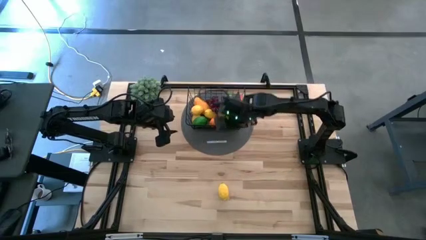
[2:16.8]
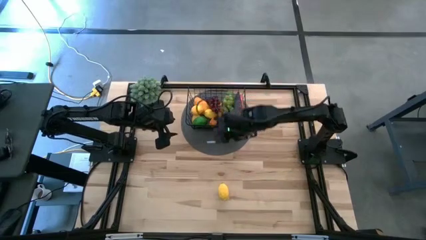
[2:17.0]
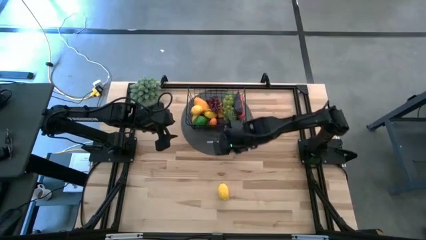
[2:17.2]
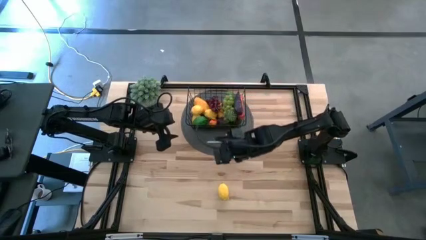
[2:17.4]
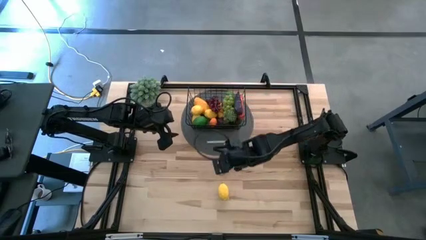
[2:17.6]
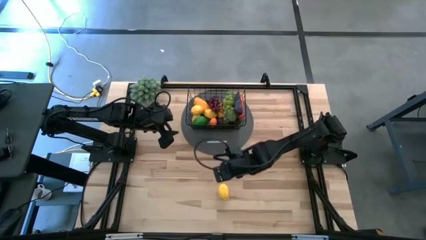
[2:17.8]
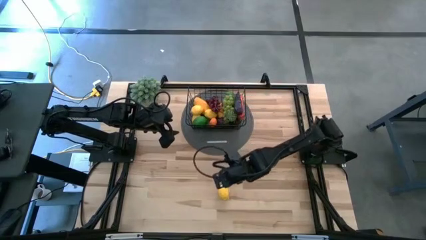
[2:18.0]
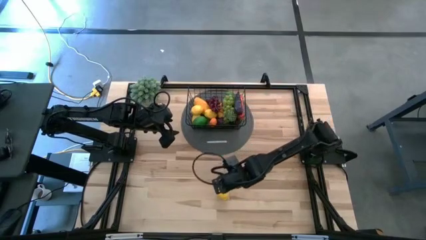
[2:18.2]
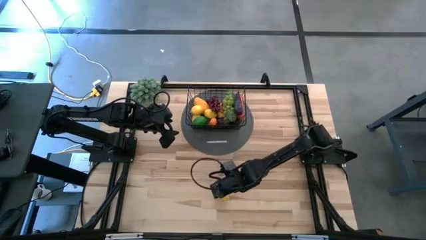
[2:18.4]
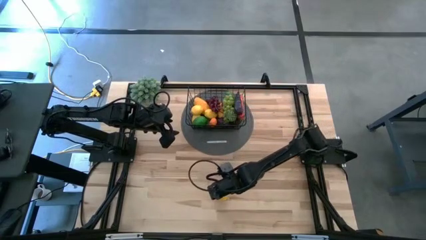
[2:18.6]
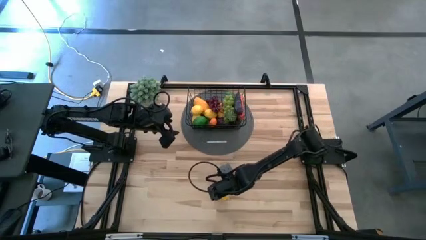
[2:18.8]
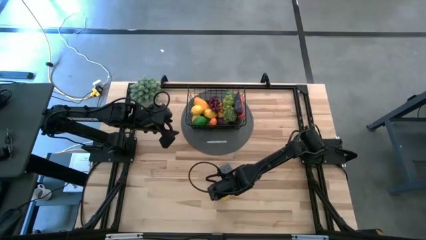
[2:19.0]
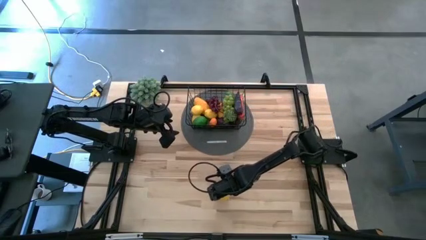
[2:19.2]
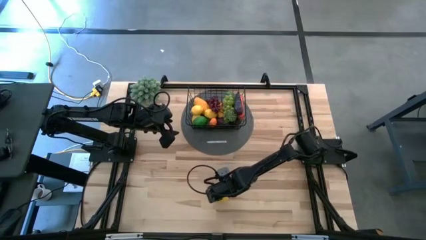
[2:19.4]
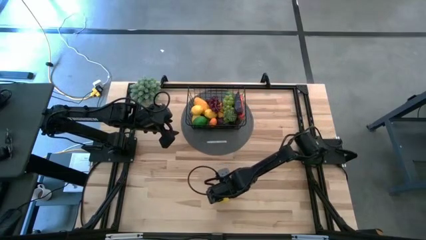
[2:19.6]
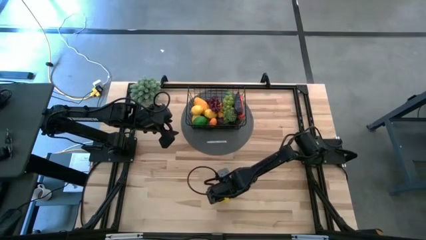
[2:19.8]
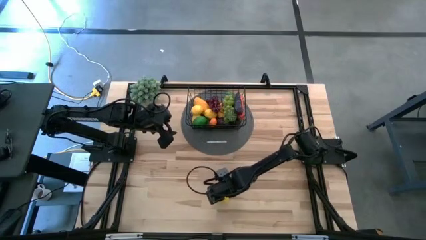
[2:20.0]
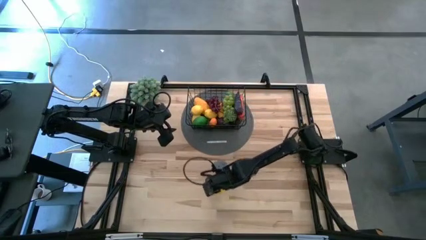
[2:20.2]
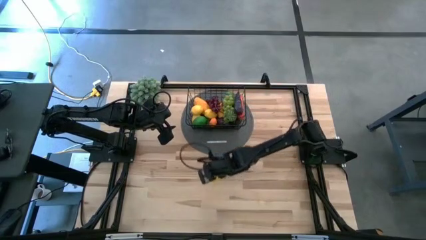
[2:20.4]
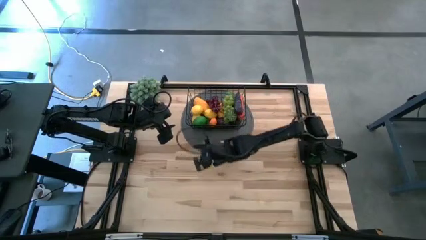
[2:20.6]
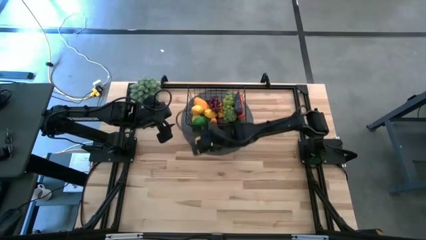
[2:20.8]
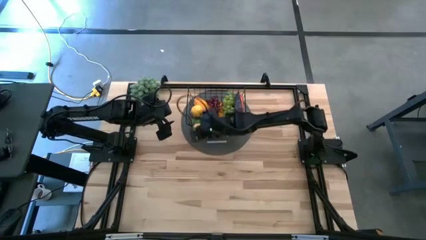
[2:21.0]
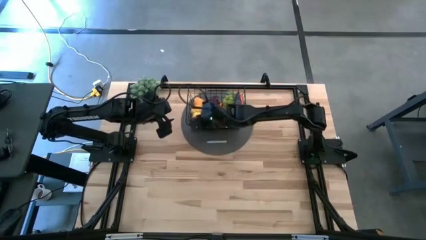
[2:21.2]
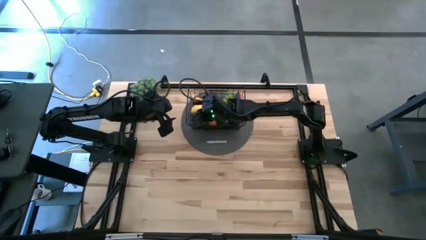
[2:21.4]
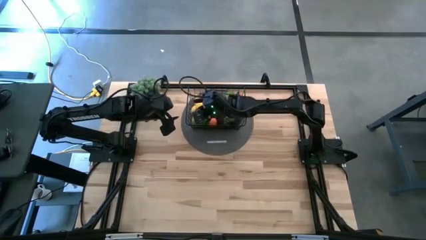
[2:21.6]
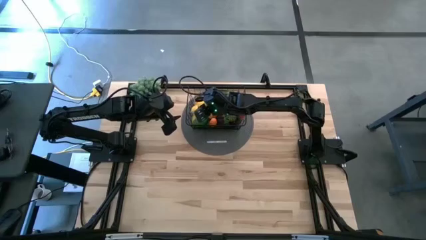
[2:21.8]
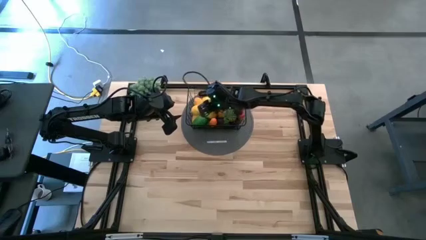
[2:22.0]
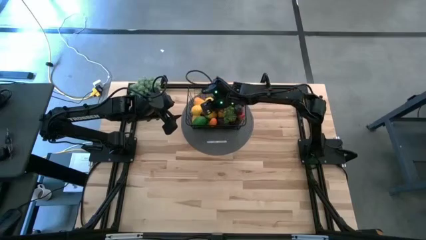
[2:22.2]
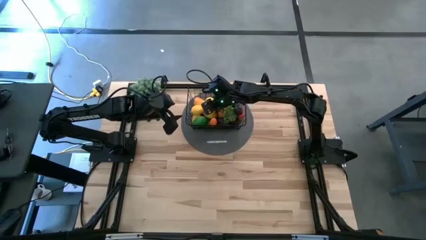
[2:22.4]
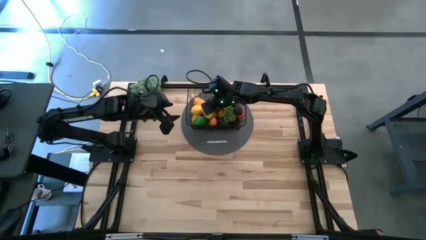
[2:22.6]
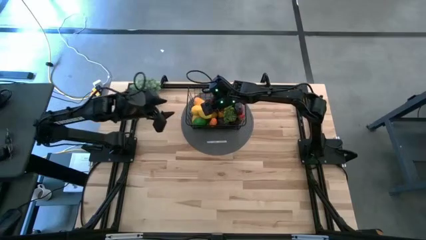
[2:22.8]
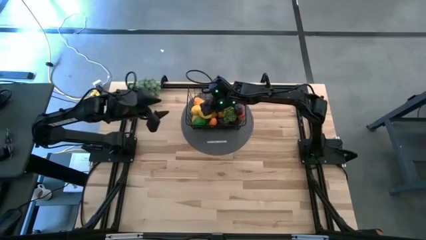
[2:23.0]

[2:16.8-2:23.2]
Task: Build produce basket
Put the right yellow lemon into the black wire basket

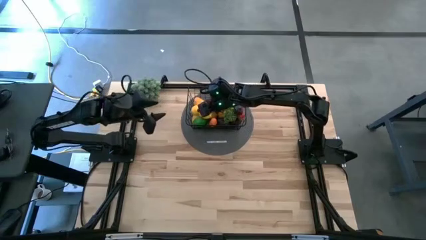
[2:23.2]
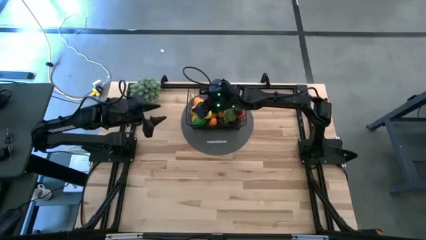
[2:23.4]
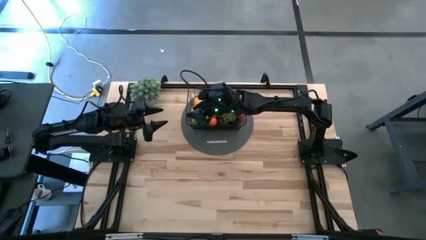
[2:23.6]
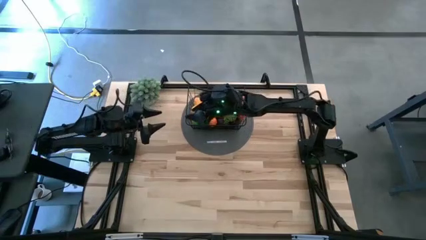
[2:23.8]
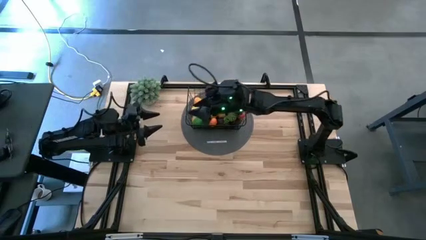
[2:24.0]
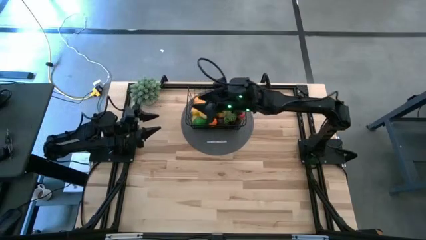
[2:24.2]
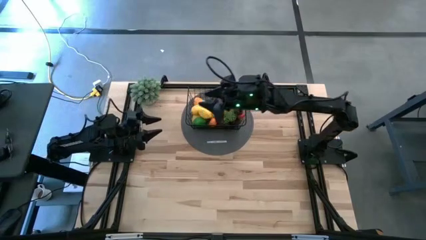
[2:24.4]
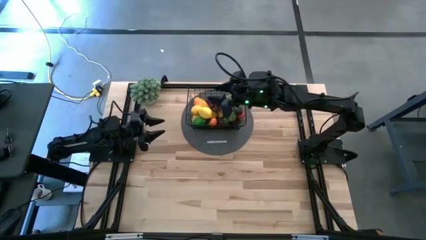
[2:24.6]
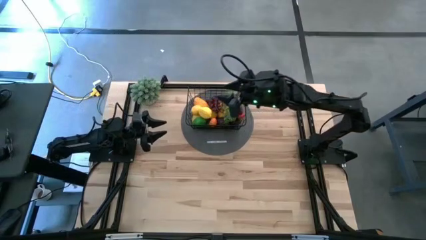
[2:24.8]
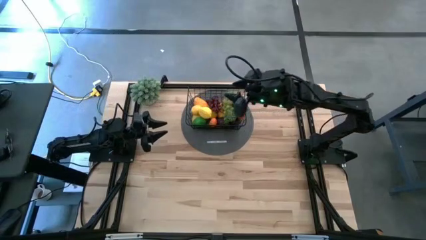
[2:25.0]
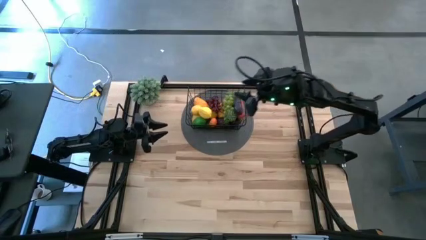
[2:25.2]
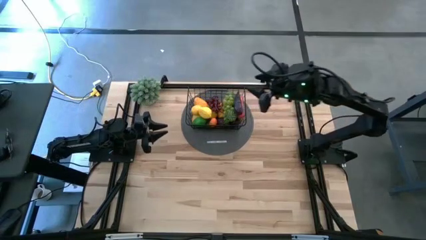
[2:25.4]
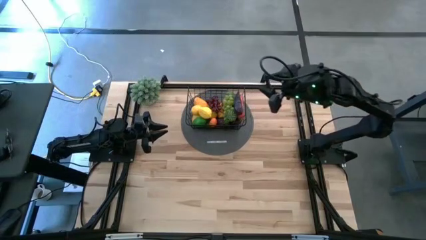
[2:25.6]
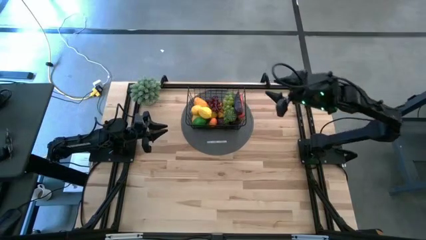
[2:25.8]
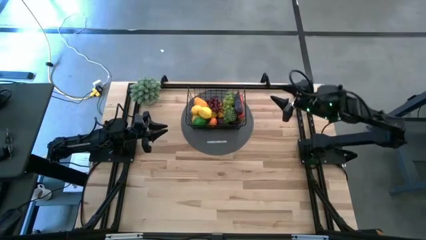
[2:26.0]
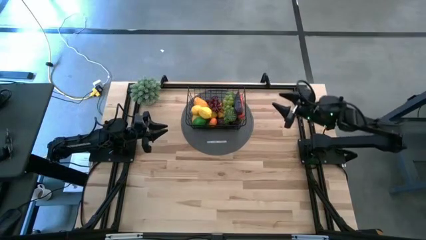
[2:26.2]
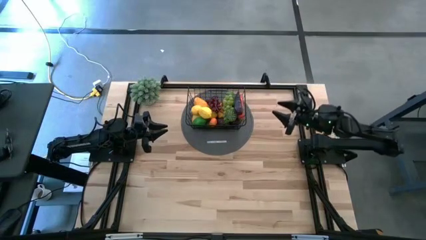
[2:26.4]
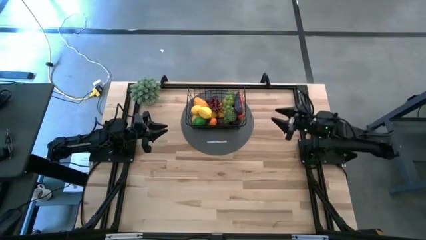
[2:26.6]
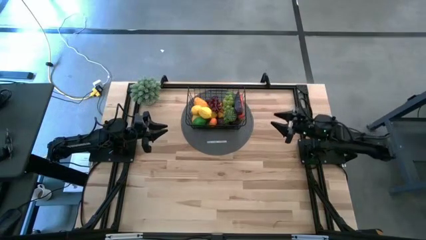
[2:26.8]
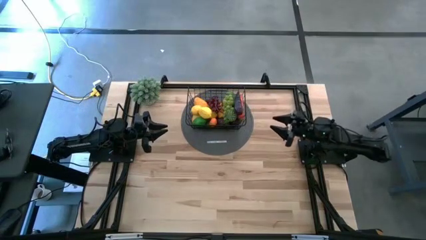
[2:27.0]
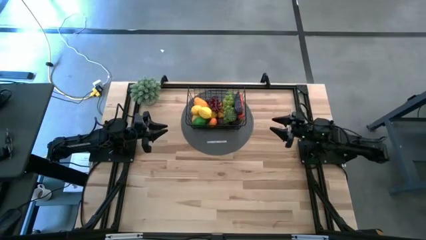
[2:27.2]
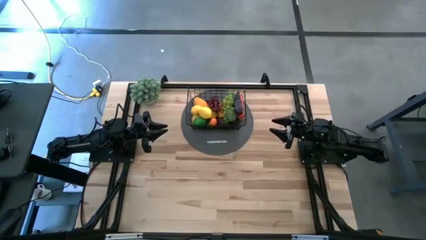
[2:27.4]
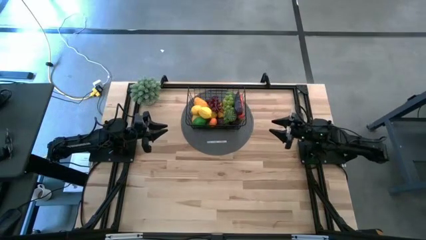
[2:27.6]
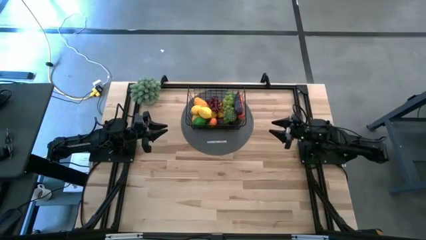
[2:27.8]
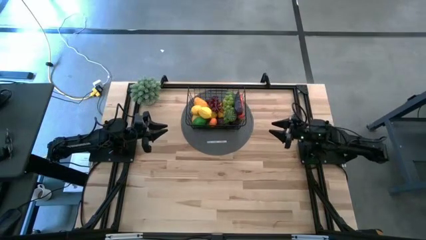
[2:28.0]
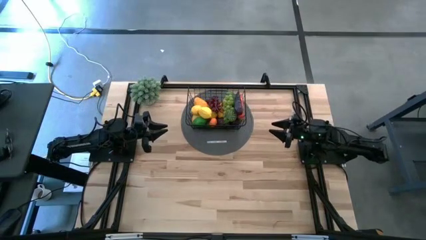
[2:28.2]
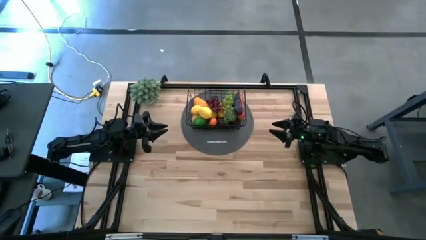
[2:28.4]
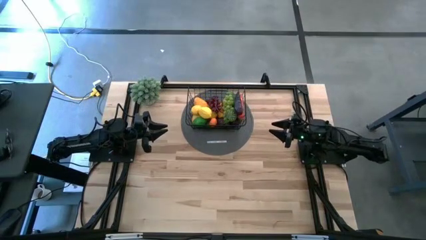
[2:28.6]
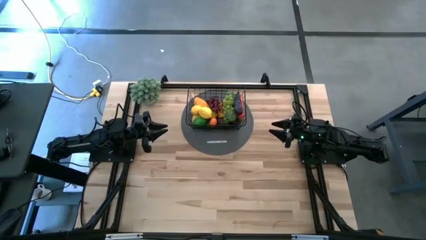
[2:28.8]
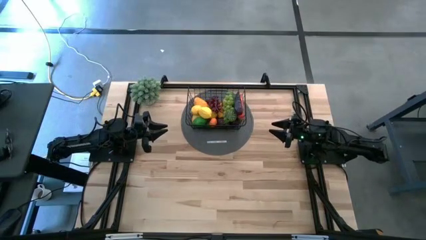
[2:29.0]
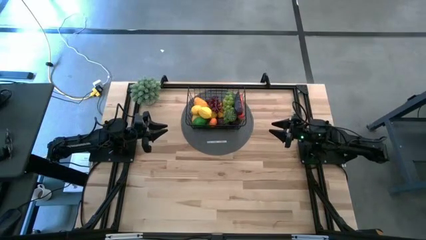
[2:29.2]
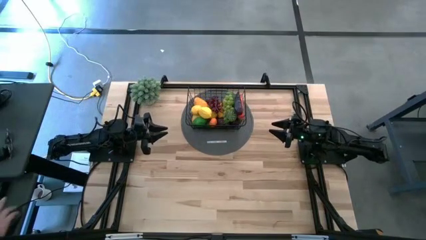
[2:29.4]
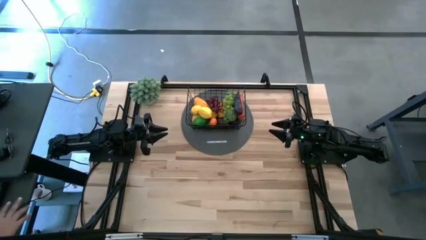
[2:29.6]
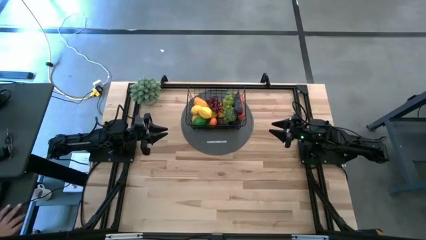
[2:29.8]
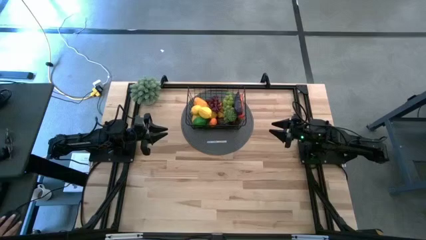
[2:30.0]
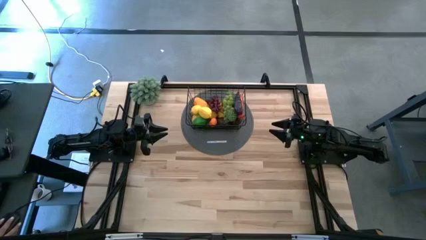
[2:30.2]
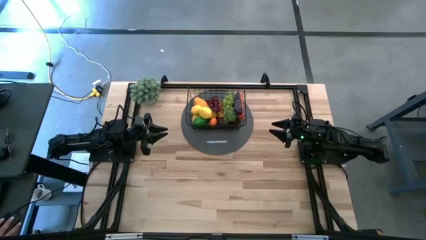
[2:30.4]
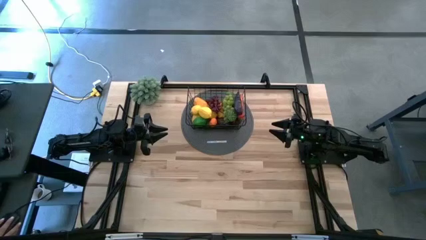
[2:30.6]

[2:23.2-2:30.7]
Return to Home Position

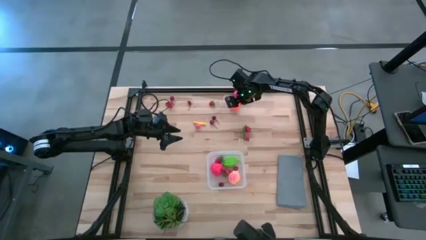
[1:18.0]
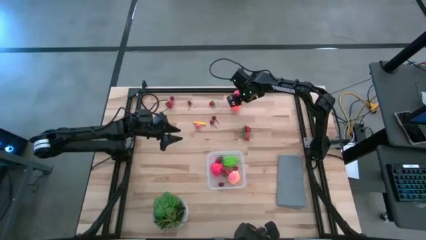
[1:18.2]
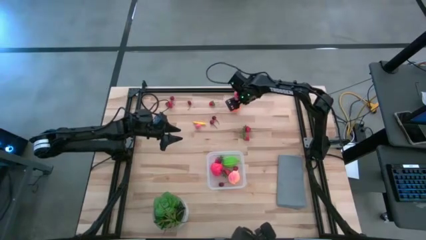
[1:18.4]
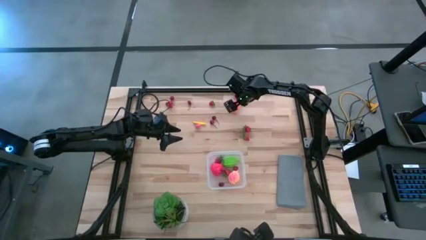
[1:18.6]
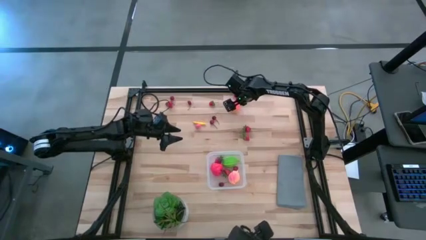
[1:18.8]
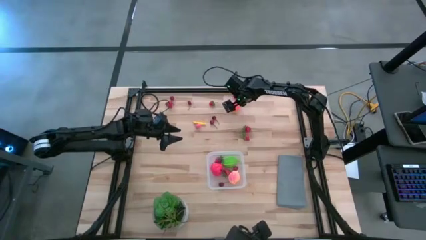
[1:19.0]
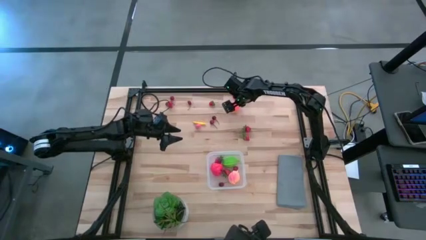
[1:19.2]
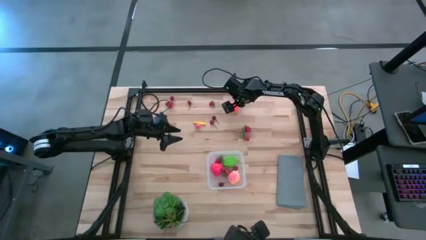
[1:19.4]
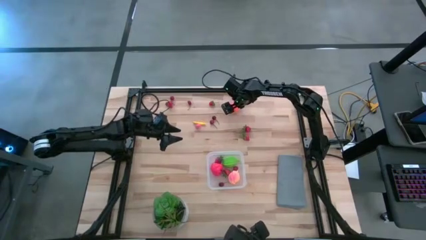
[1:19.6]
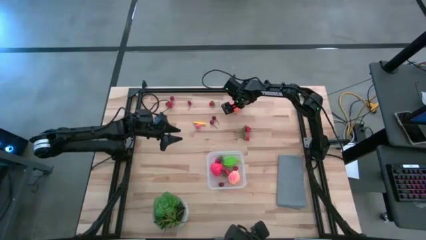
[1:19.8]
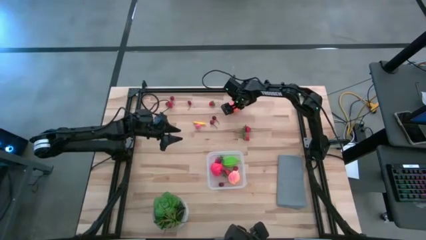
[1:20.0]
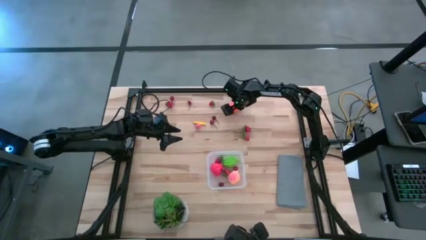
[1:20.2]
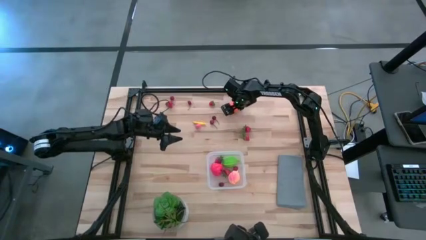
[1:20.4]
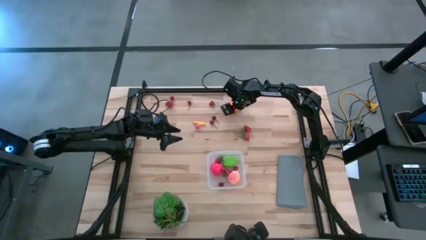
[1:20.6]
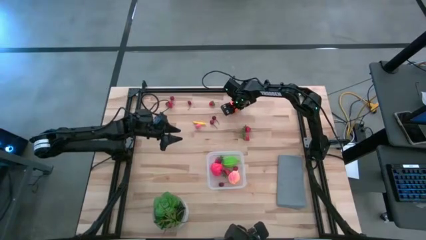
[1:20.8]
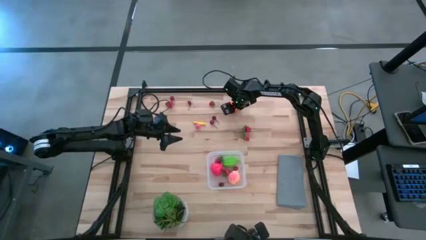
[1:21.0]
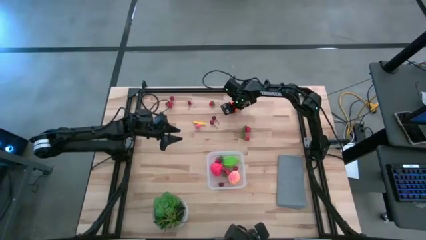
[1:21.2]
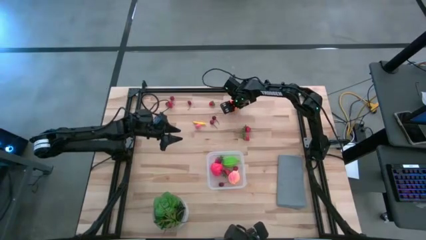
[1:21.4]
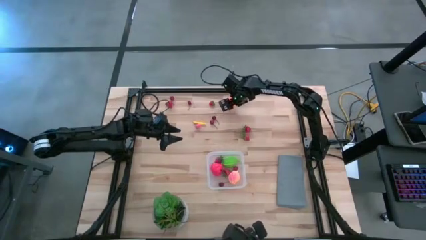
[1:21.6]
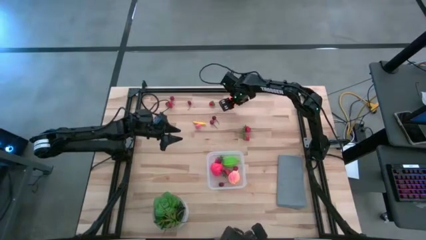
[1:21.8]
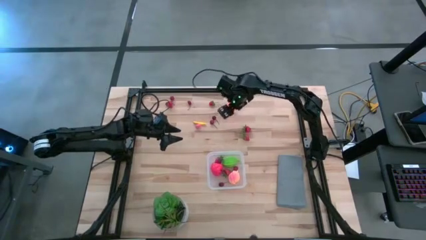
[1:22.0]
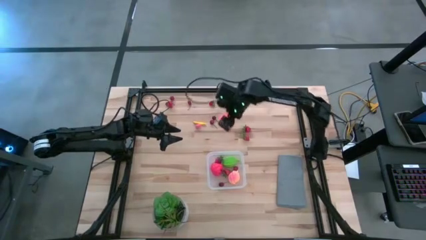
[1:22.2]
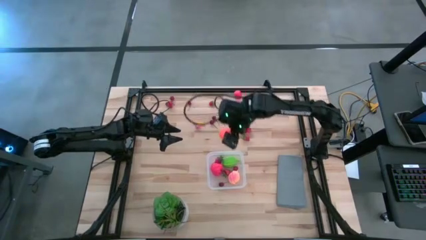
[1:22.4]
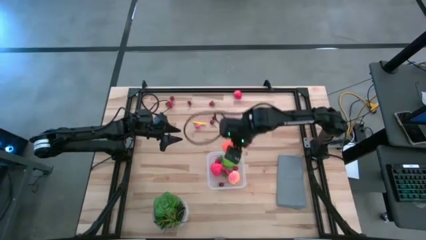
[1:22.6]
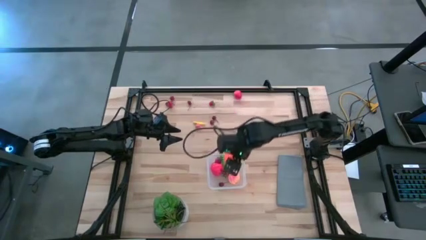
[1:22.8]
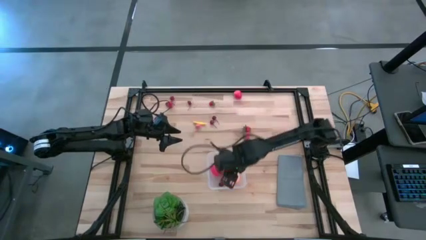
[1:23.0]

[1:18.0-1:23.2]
Task: Pick and placing Produce into tupperware
Put the orange pumpkin into the transparent bin
